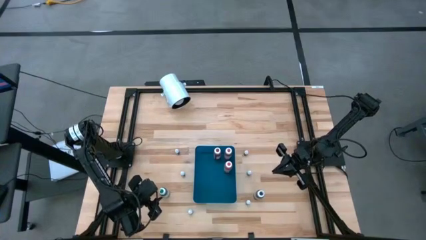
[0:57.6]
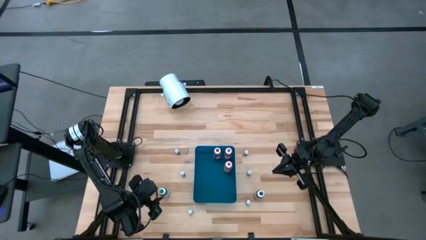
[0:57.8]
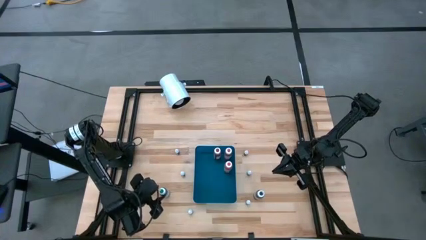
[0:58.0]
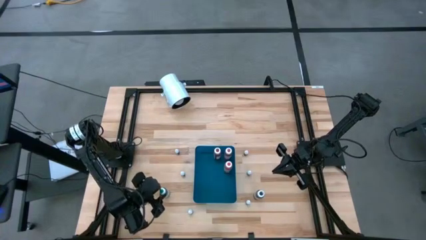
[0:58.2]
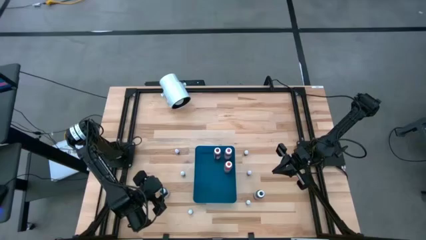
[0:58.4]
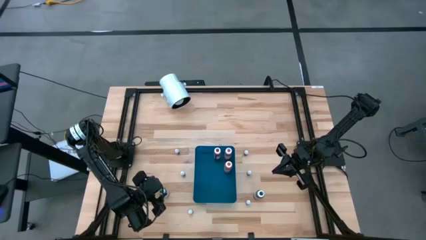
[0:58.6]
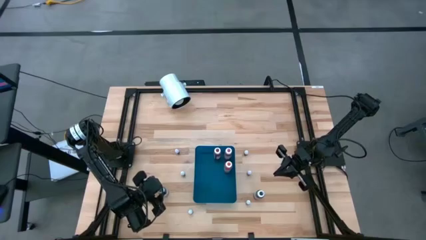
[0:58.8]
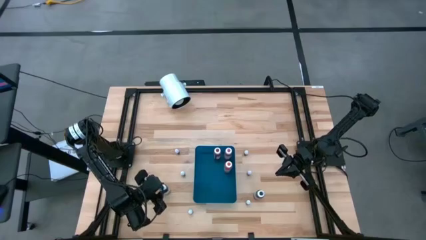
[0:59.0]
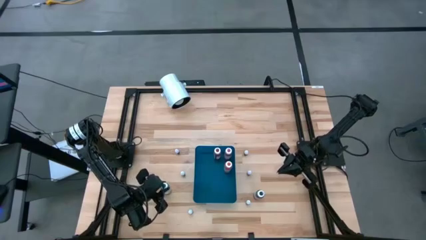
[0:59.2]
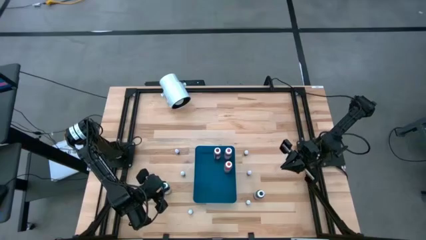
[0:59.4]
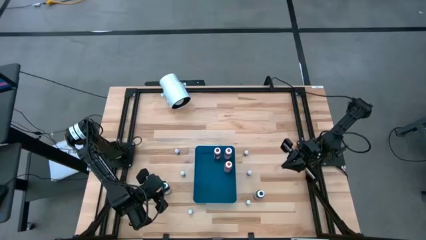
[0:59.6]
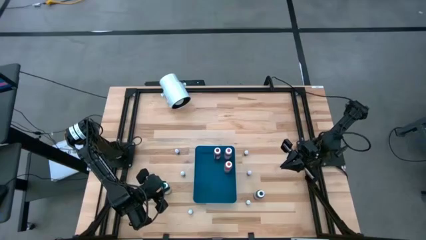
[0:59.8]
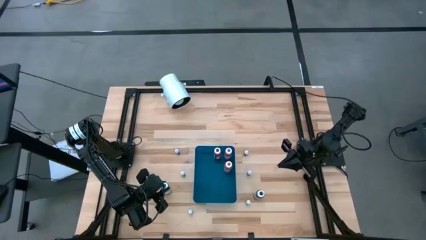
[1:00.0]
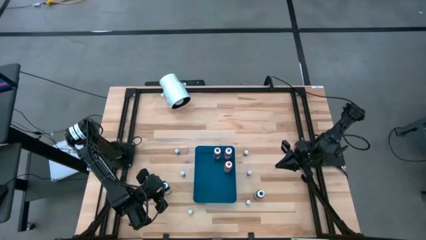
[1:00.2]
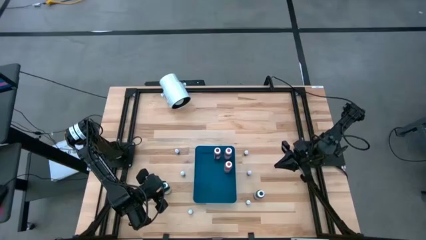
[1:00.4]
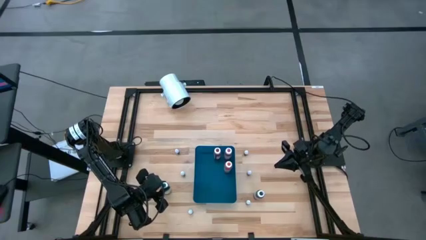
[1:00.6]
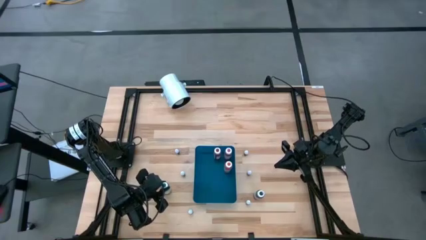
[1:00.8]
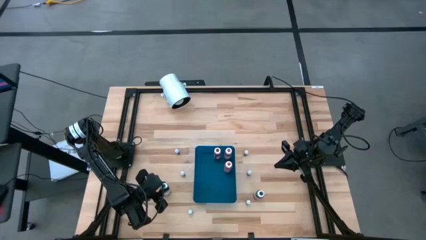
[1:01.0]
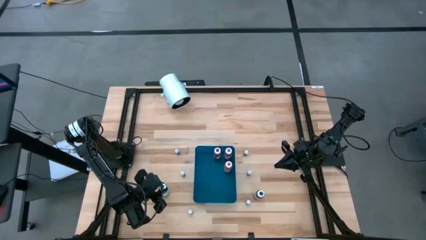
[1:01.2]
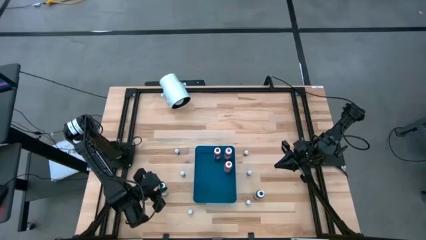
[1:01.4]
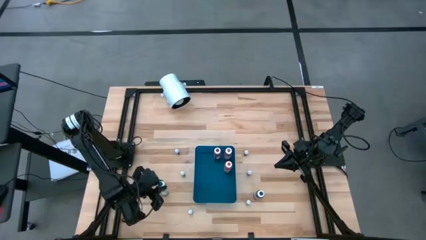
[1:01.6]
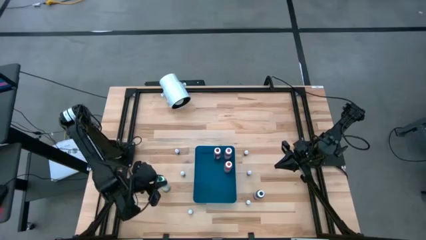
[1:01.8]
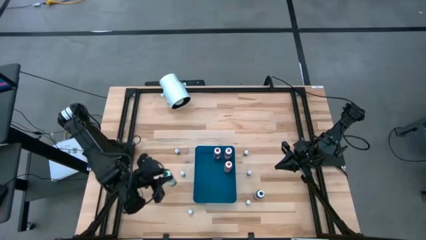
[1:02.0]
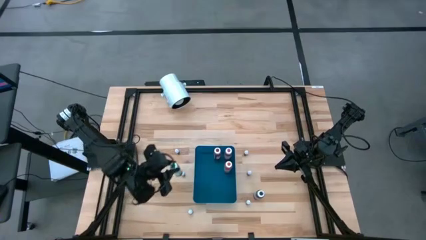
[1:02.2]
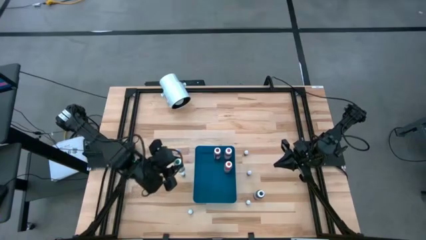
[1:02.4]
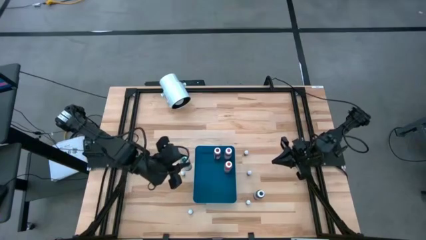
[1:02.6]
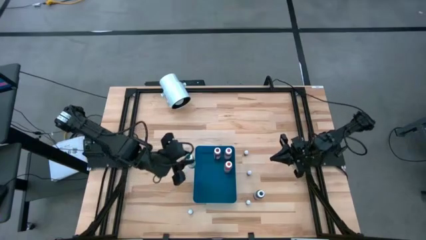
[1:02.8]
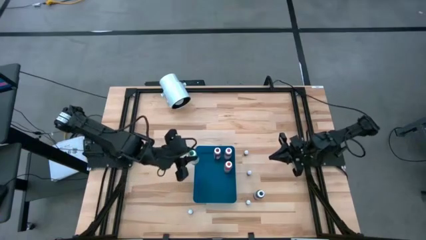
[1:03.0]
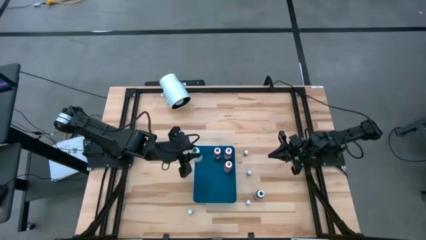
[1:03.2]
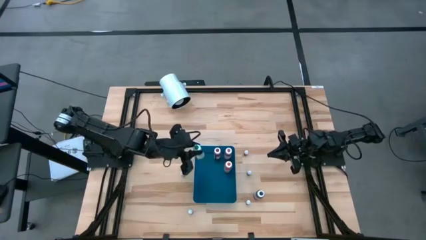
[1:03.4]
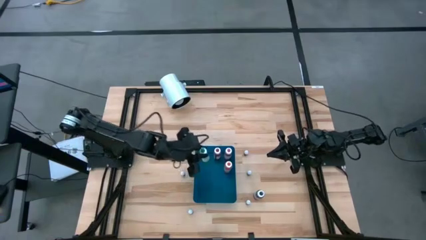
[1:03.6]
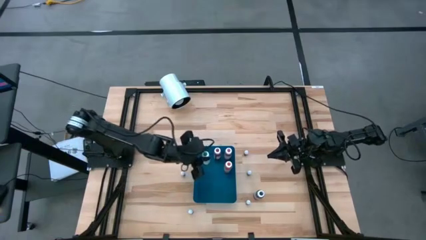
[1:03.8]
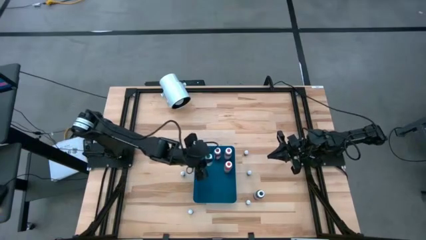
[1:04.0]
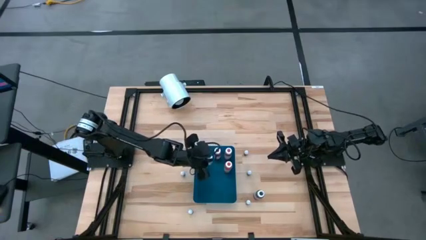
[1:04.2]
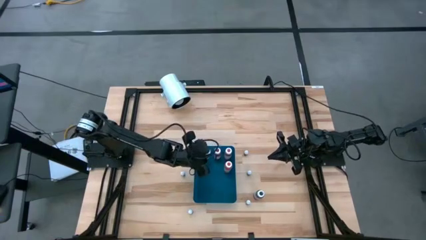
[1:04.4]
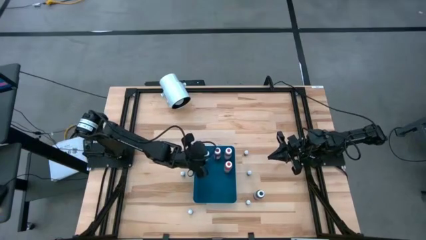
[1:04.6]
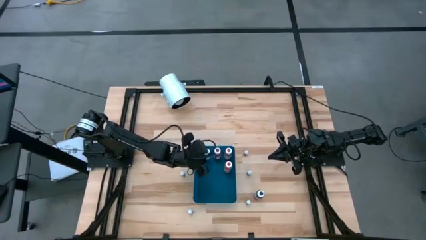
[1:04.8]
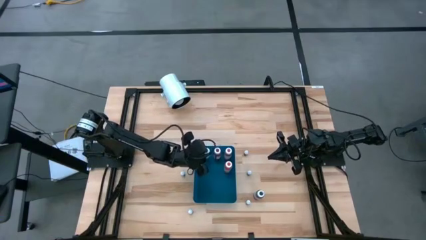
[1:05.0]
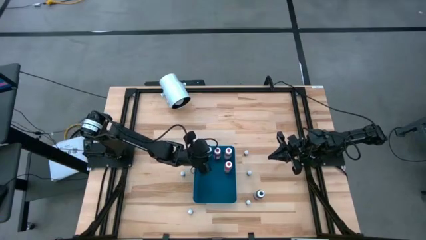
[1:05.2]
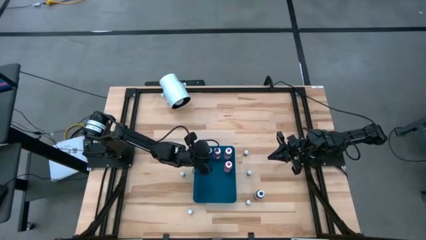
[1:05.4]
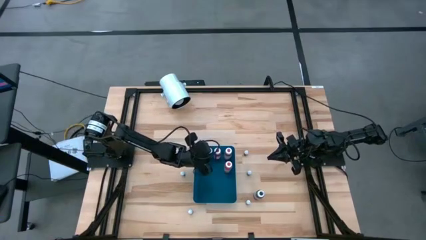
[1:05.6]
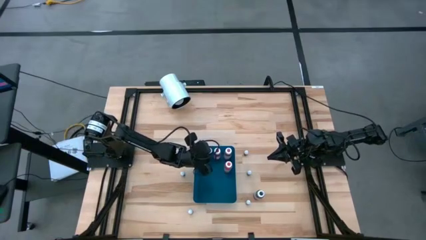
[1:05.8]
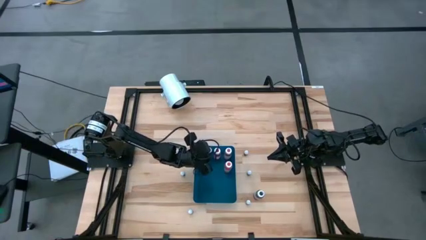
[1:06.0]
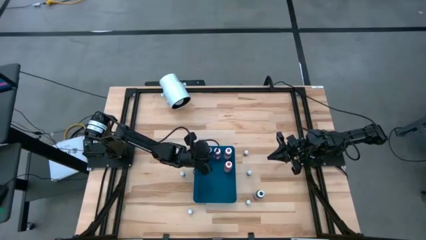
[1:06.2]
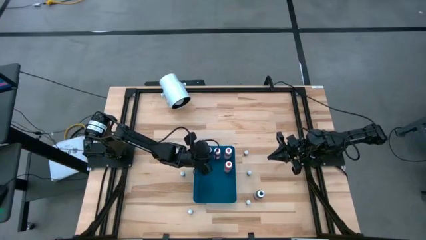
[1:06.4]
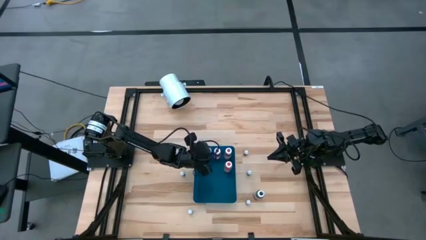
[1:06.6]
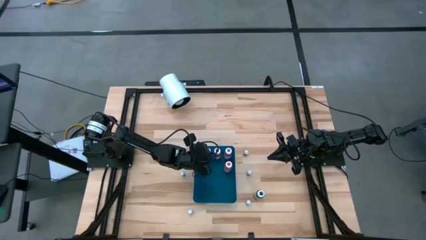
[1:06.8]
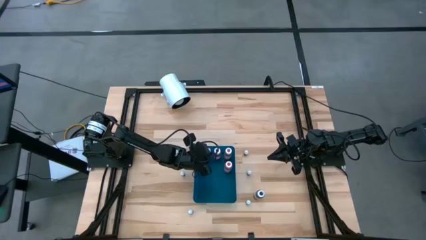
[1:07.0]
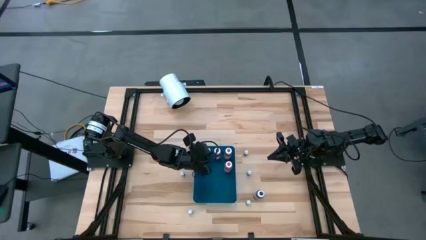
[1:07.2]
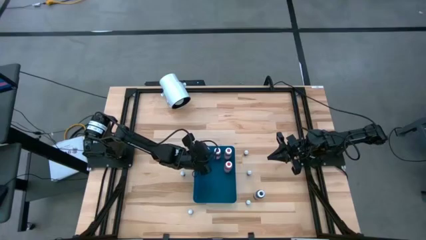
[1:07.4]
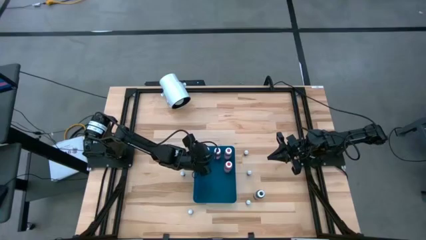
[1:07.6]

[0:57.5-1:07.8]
Task: Pick & Place food coloring
Put the big green food coloring bottle into the blue container

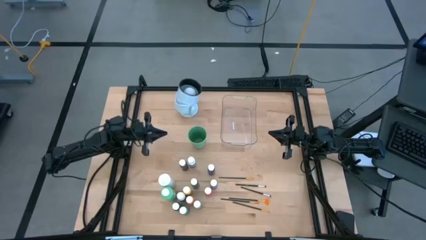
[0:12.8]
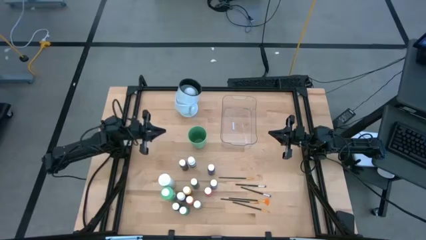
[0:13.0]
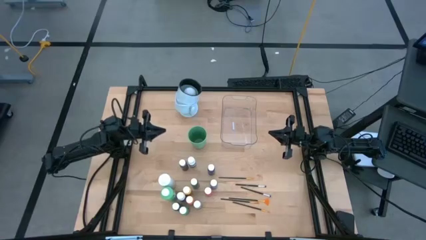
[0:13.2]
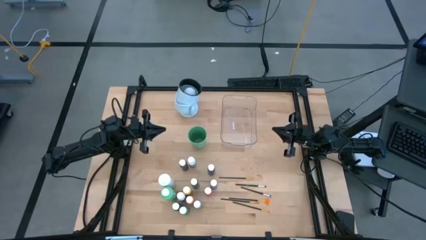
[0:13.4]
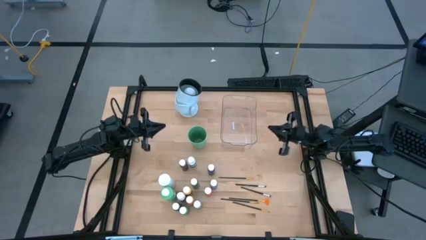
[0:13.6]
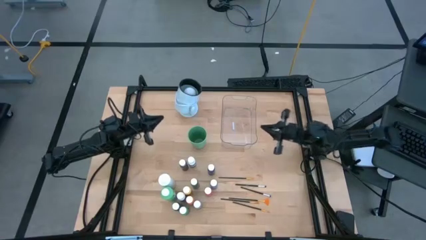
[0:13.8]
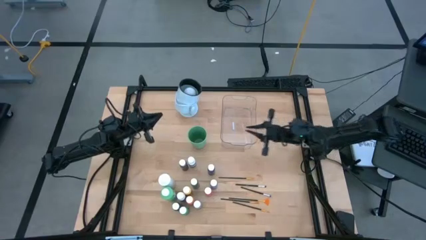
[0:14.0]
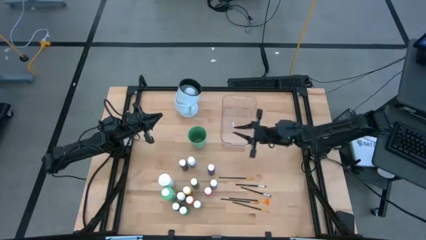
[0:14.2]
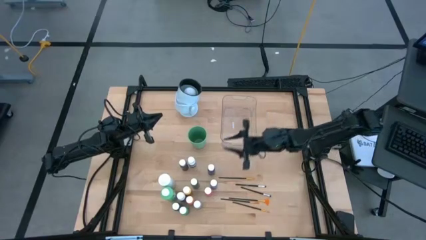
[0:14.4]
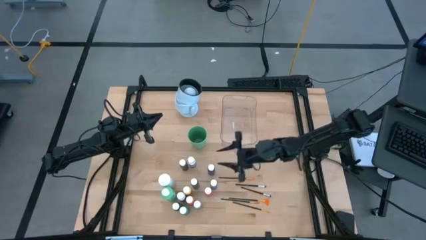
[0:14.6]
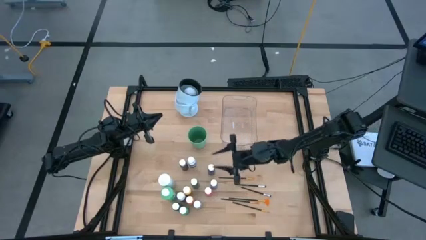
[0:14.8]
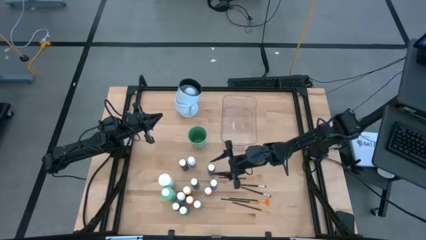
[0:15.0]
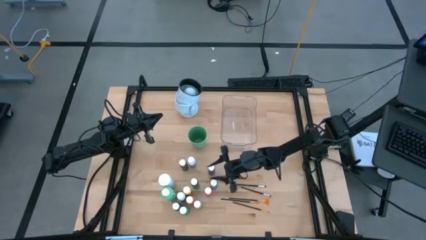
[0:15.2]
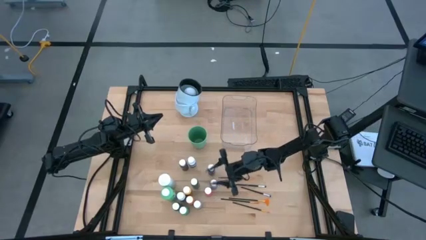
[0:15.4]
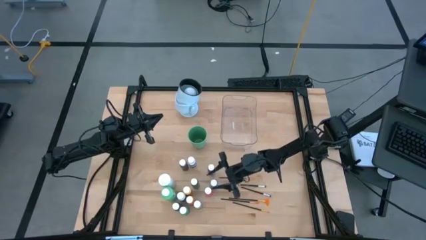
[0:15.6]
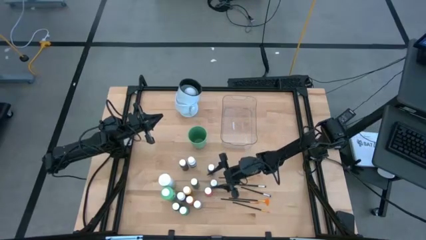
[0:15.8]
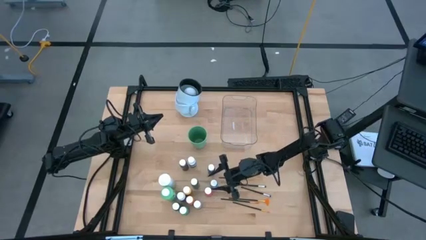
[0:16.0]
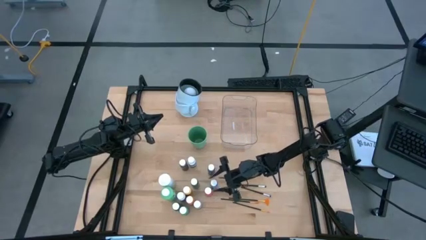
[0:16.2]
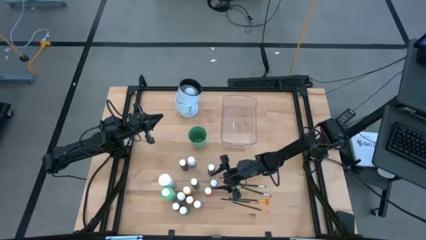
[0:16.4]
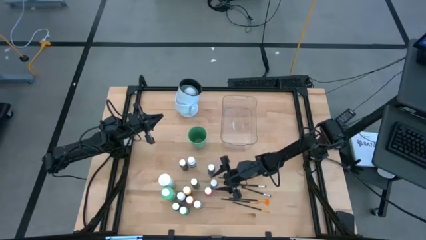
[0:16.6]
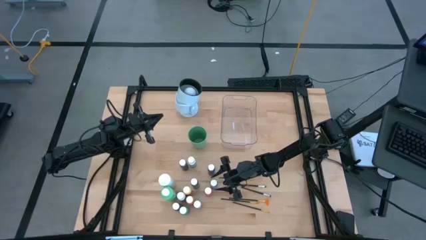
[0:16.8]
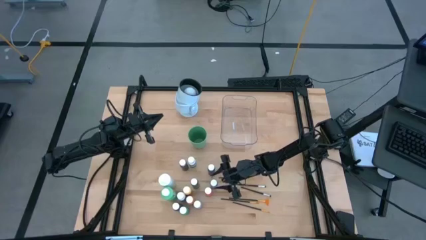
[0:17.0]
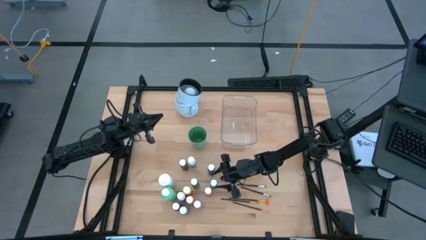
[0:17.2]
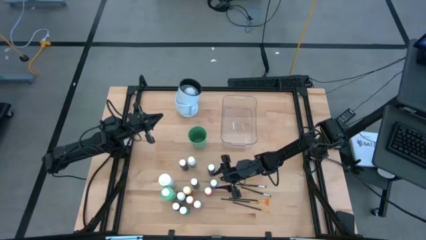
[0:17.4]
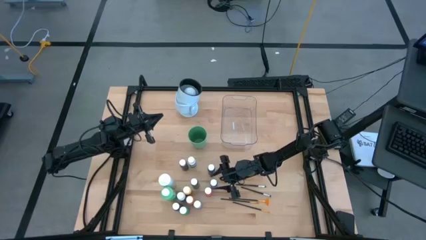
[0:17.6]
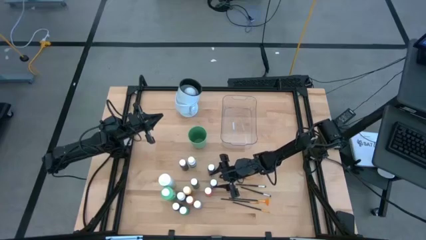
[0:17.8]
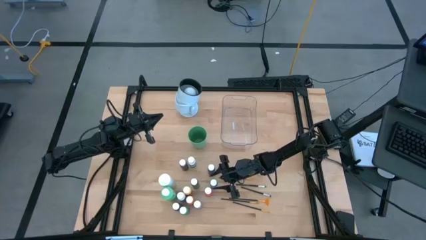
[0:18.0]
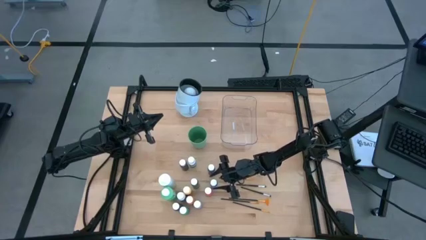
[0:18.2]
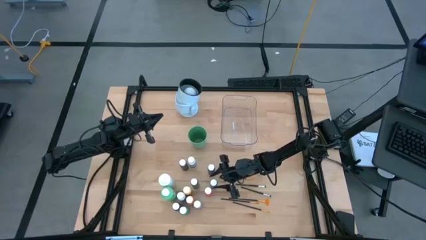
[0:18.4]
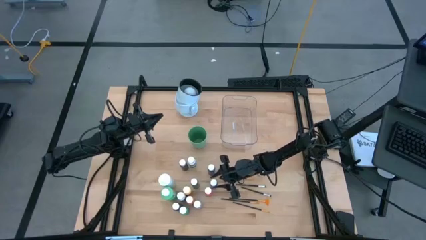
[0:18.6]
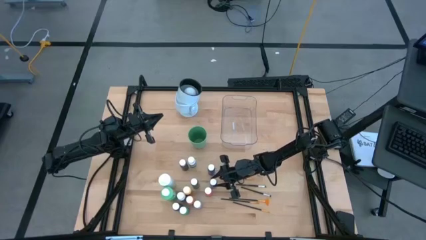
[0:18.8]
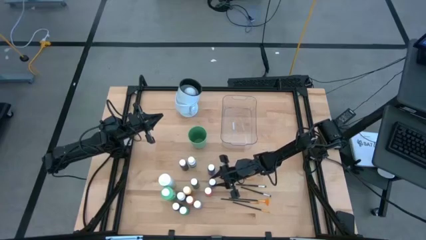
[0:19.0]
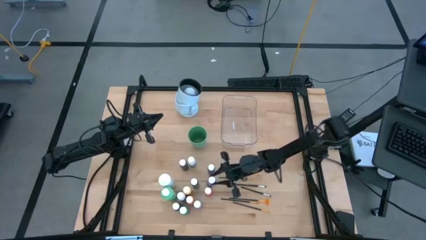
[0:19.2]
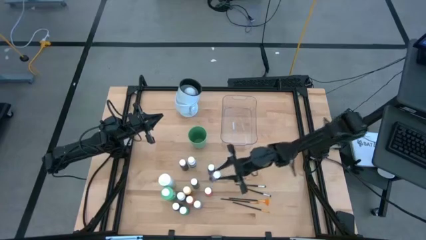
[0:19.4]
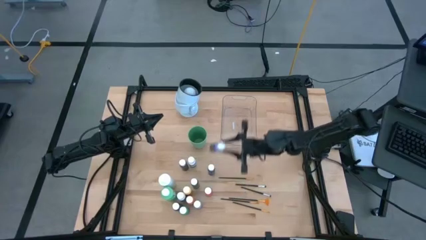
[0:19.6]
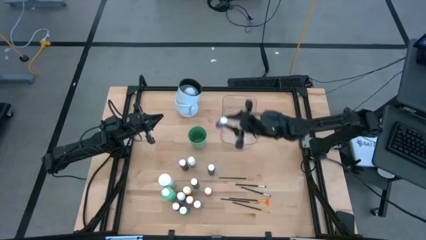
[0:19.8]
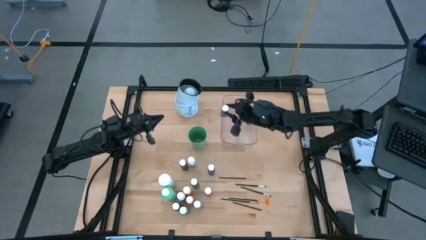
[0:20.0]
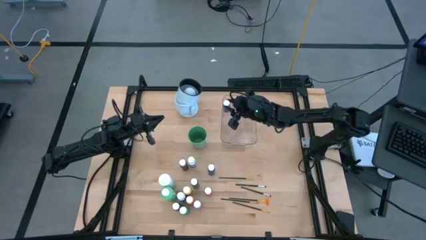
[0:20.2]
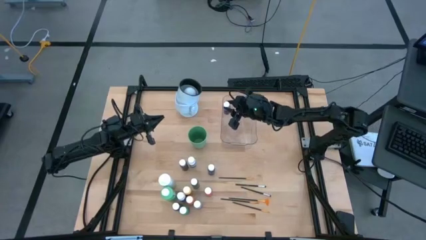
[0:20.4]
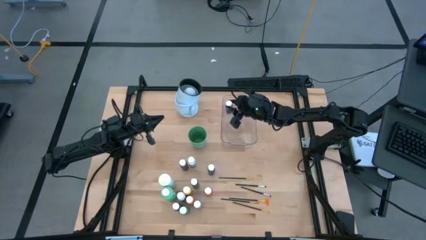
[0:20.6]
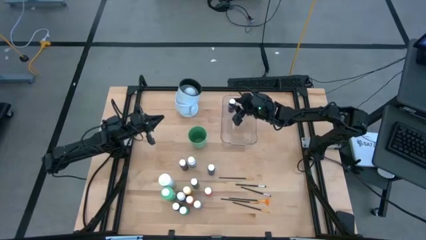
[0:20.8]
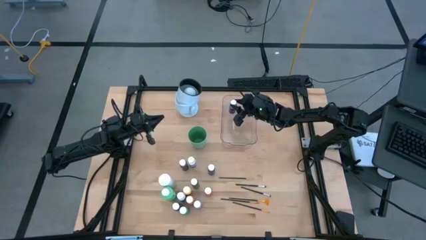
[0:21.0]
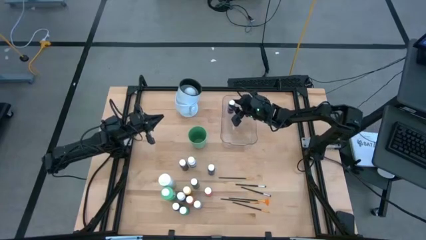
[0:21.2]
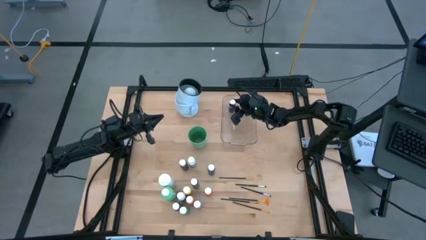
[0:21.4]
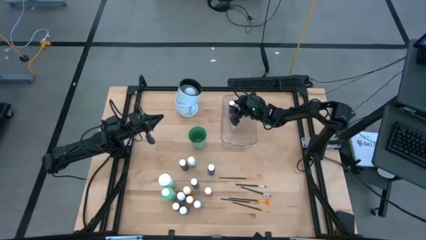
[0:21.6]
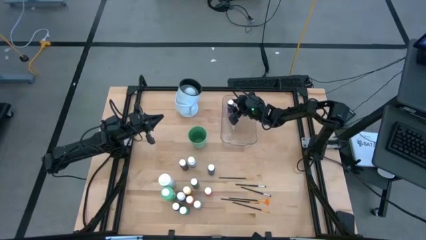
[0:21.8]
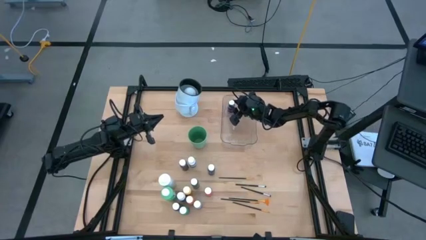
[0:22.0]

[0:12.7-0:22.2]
Task: Pick & Place Paint Supplies
Put the purple paint bottle into the transparent bin
